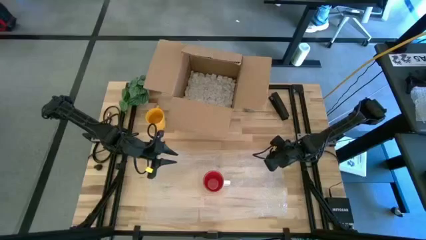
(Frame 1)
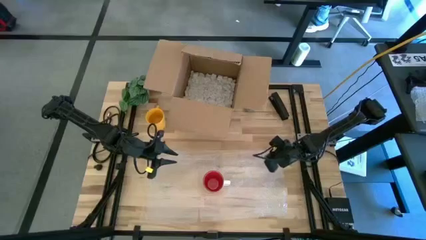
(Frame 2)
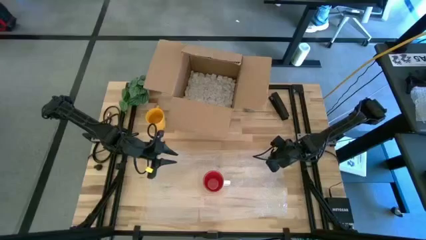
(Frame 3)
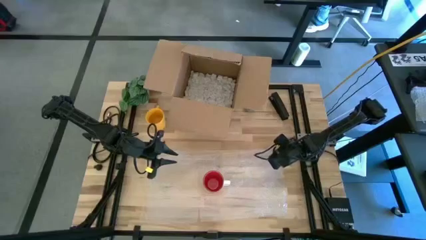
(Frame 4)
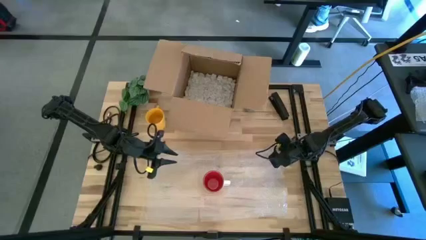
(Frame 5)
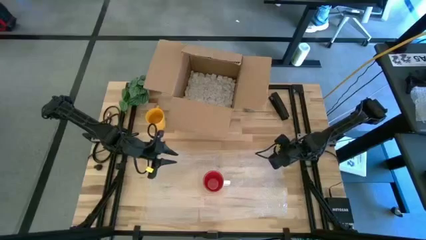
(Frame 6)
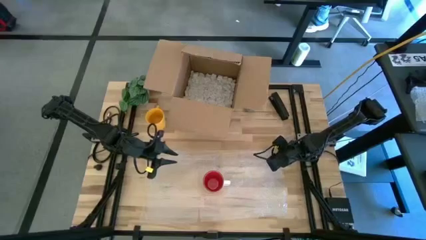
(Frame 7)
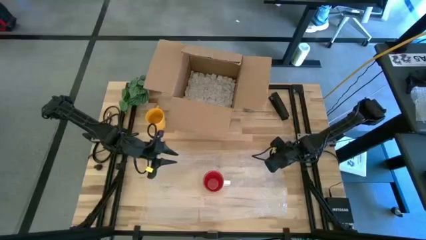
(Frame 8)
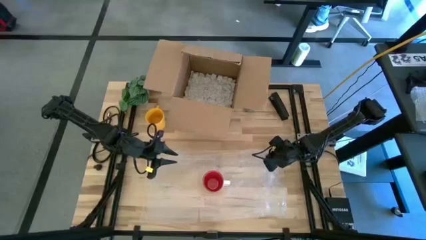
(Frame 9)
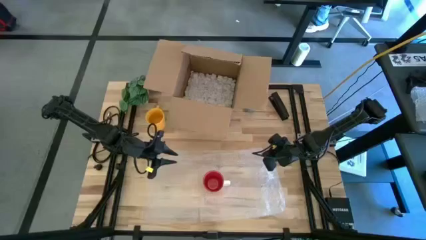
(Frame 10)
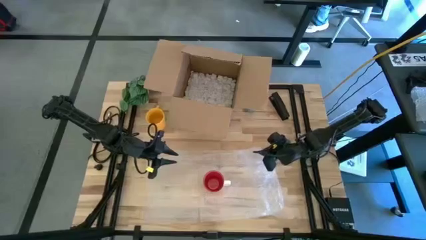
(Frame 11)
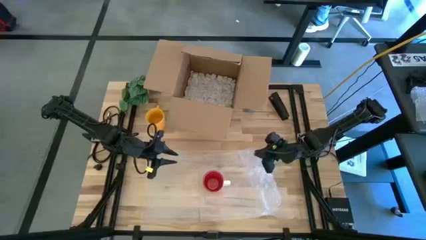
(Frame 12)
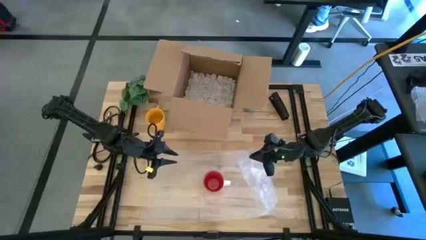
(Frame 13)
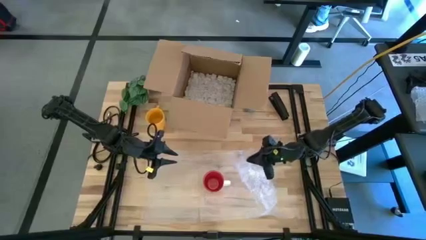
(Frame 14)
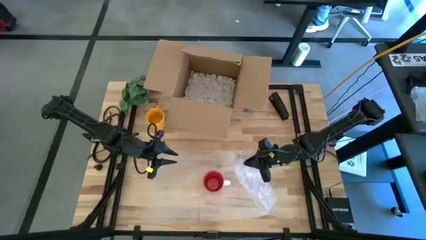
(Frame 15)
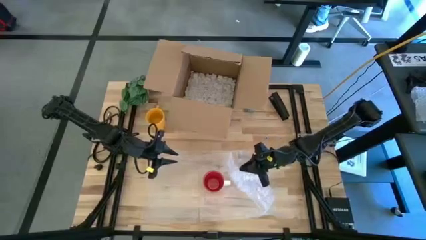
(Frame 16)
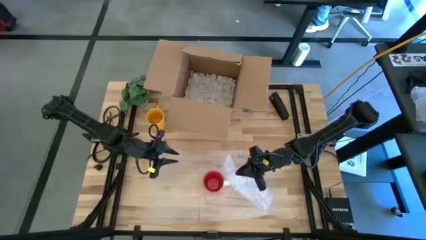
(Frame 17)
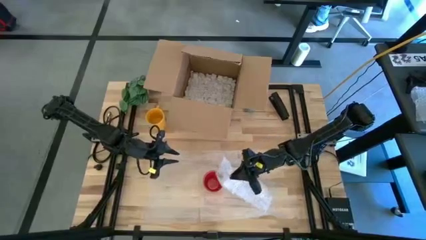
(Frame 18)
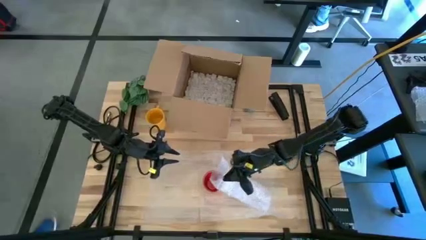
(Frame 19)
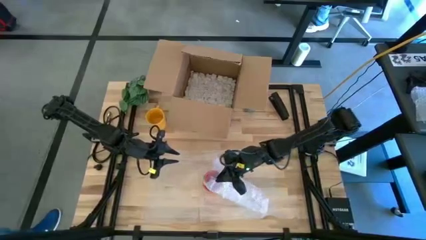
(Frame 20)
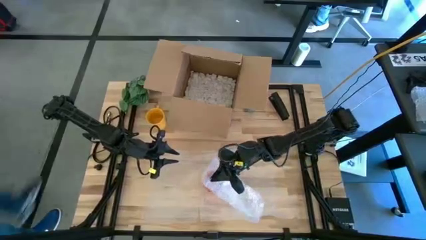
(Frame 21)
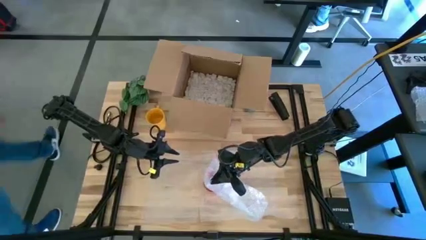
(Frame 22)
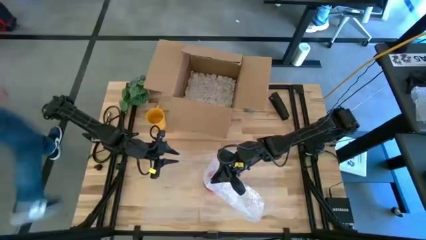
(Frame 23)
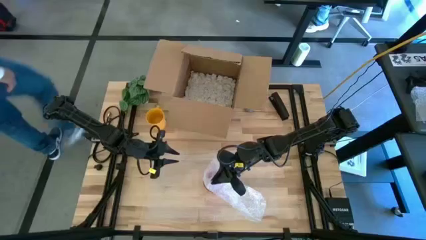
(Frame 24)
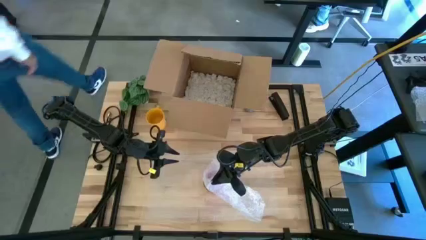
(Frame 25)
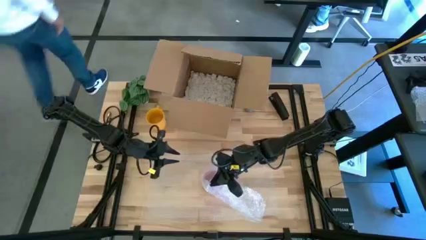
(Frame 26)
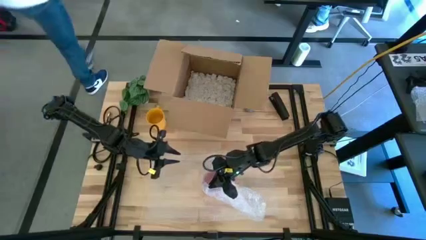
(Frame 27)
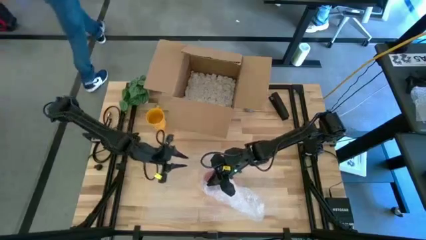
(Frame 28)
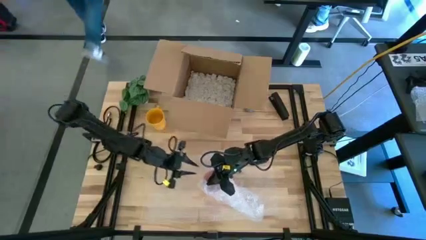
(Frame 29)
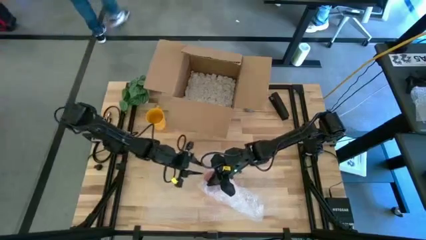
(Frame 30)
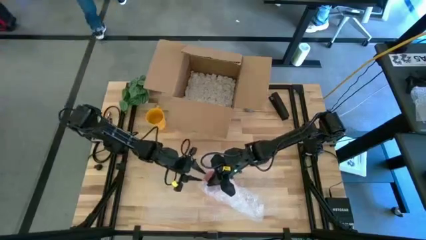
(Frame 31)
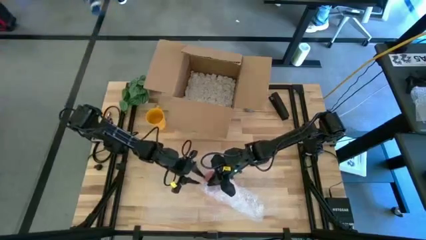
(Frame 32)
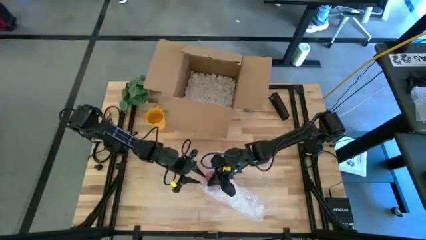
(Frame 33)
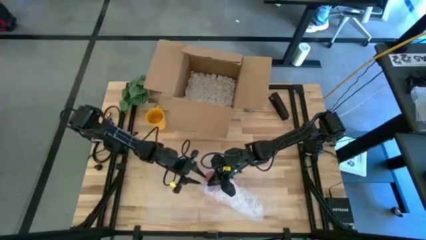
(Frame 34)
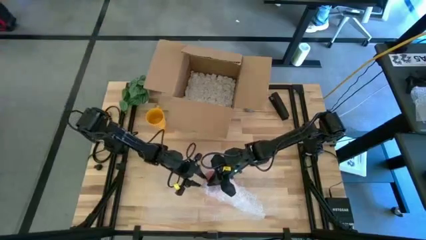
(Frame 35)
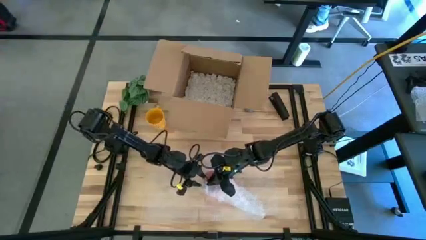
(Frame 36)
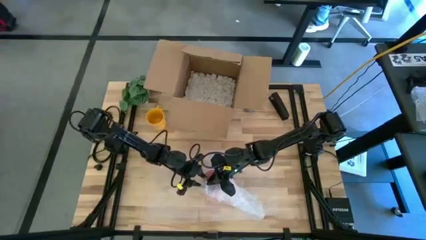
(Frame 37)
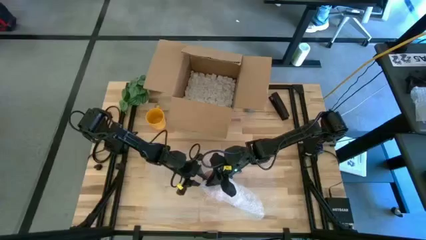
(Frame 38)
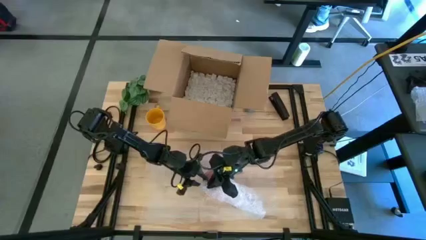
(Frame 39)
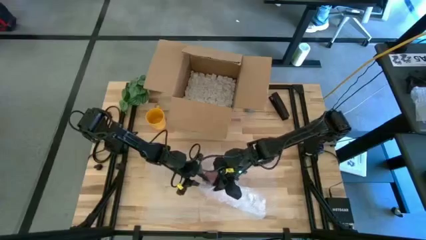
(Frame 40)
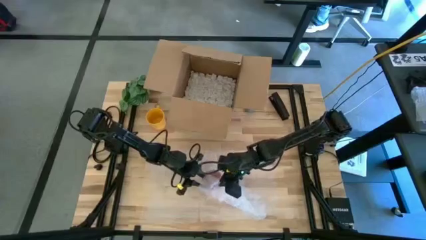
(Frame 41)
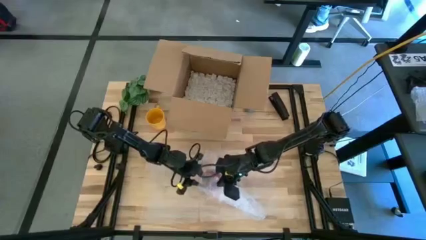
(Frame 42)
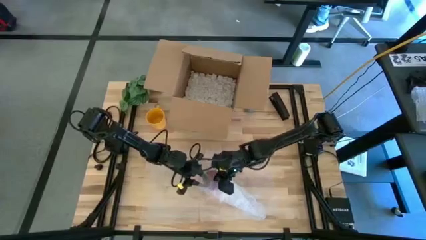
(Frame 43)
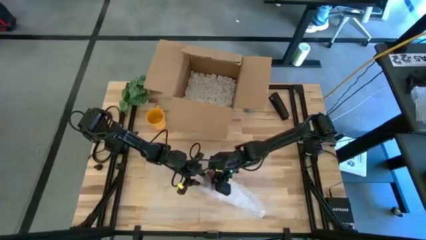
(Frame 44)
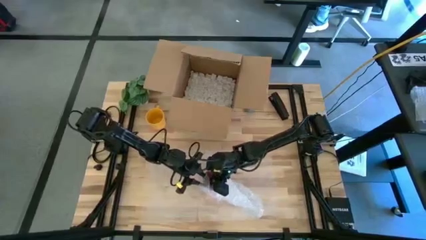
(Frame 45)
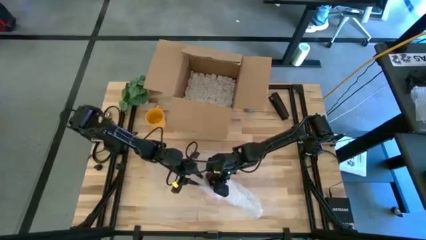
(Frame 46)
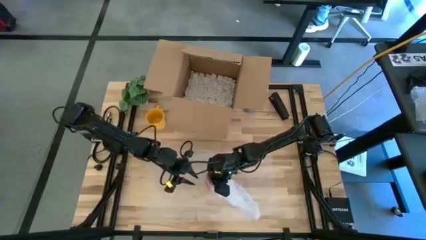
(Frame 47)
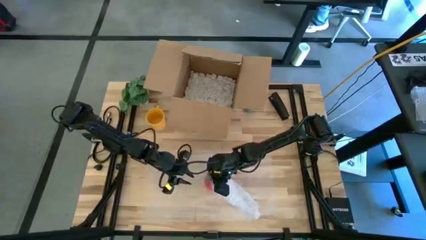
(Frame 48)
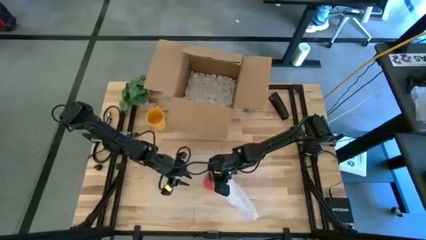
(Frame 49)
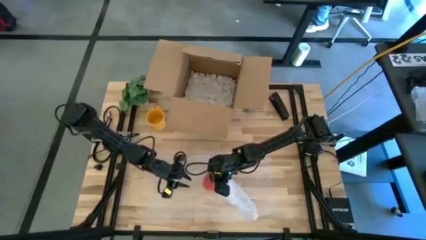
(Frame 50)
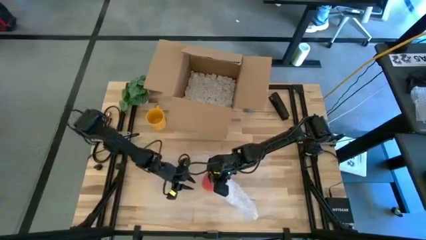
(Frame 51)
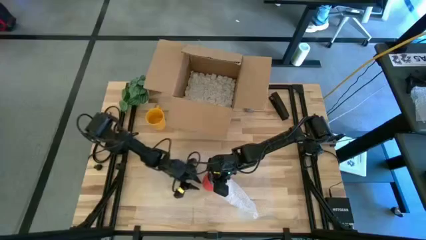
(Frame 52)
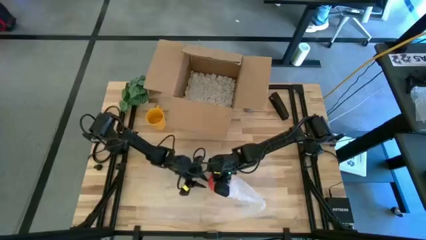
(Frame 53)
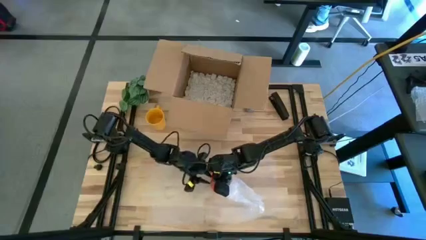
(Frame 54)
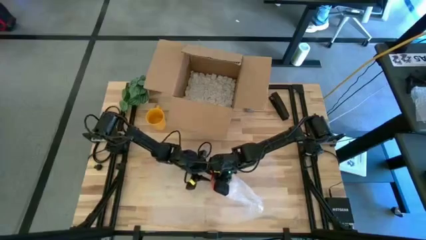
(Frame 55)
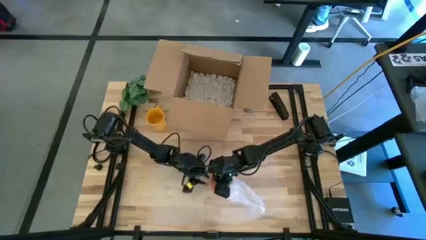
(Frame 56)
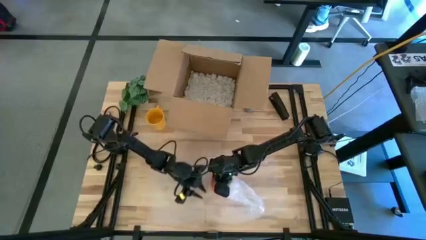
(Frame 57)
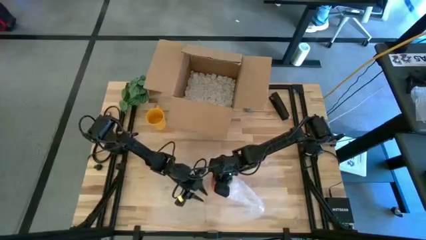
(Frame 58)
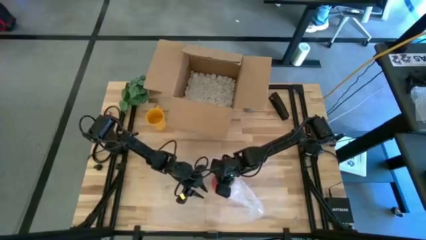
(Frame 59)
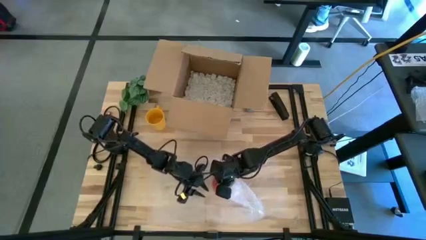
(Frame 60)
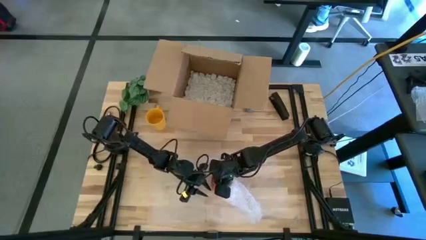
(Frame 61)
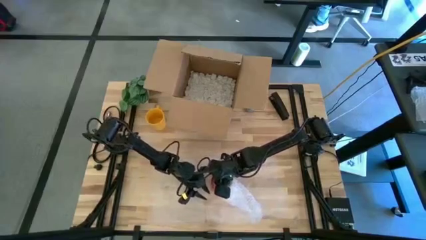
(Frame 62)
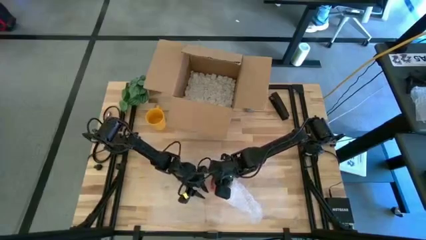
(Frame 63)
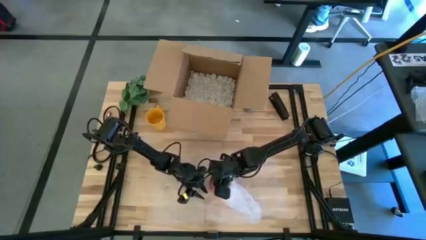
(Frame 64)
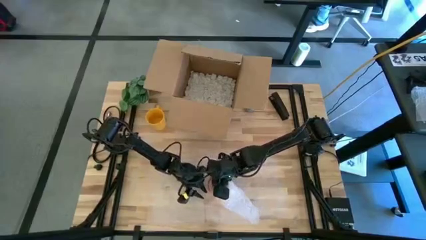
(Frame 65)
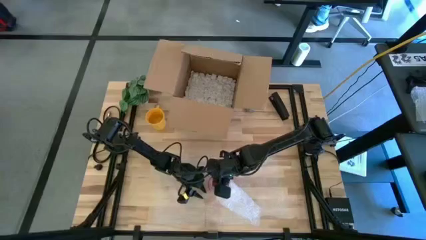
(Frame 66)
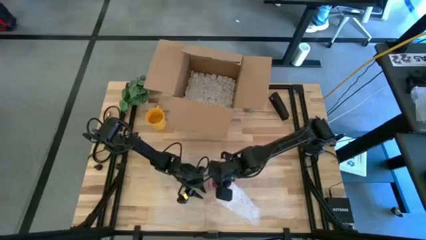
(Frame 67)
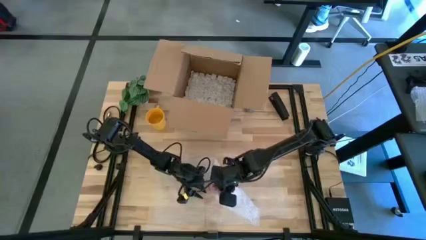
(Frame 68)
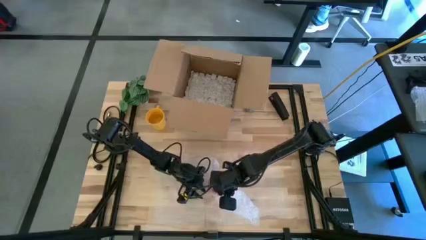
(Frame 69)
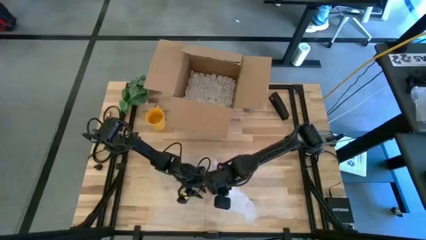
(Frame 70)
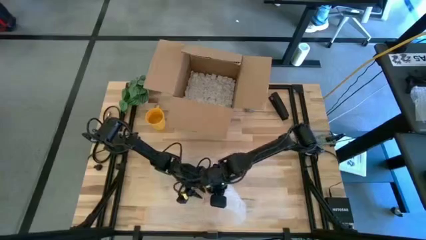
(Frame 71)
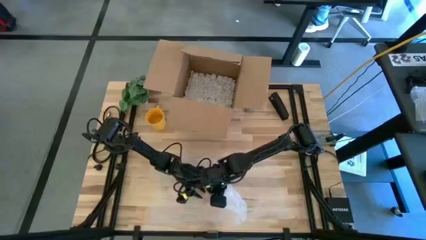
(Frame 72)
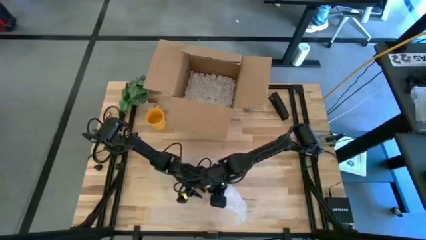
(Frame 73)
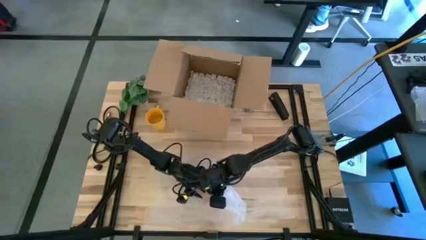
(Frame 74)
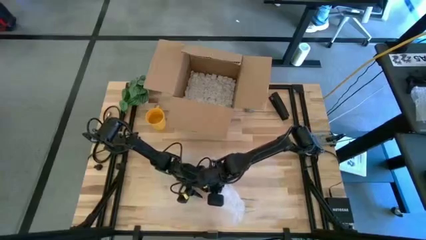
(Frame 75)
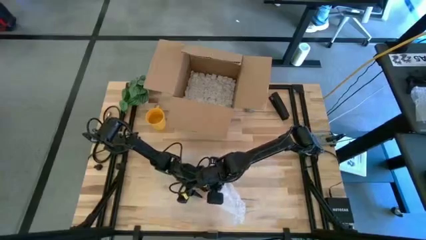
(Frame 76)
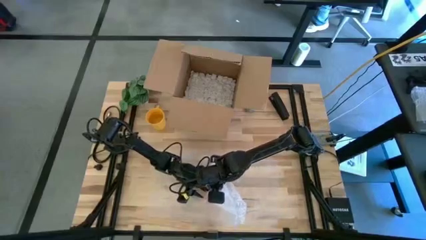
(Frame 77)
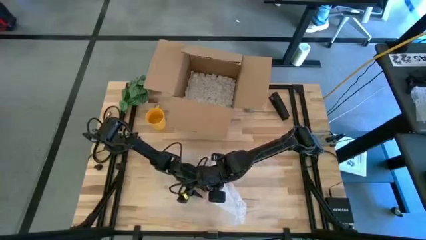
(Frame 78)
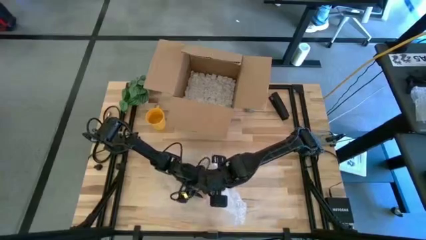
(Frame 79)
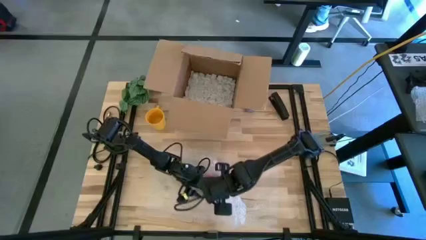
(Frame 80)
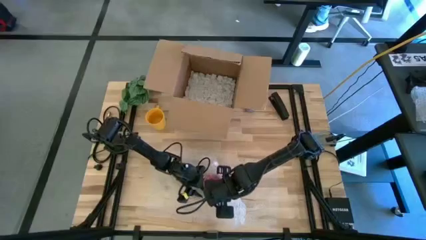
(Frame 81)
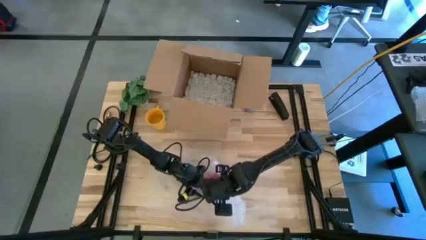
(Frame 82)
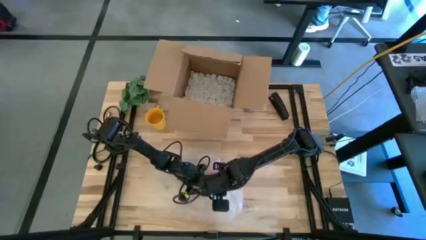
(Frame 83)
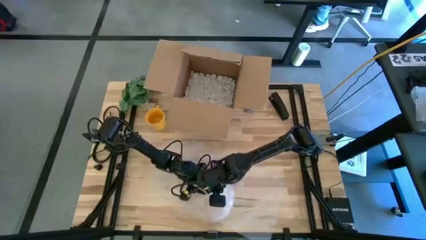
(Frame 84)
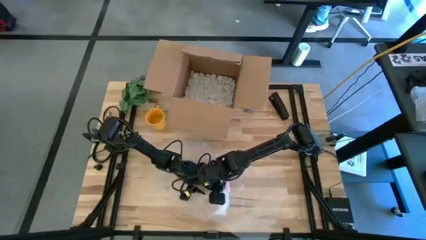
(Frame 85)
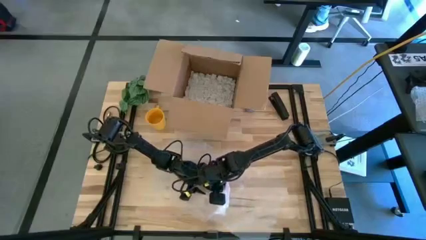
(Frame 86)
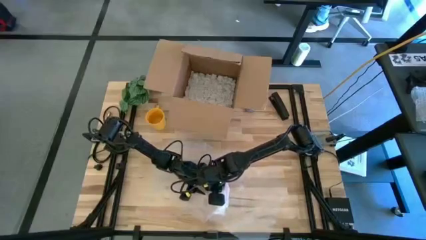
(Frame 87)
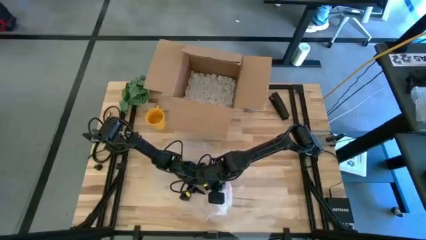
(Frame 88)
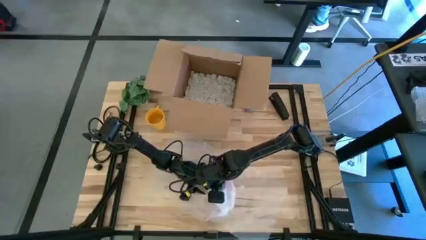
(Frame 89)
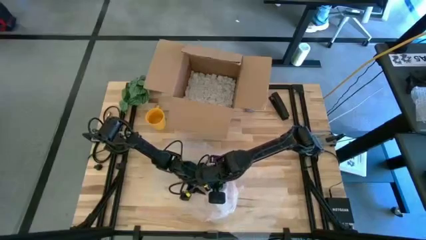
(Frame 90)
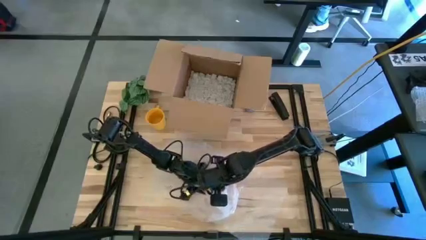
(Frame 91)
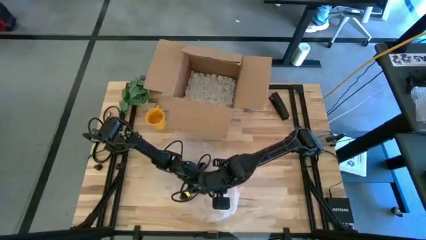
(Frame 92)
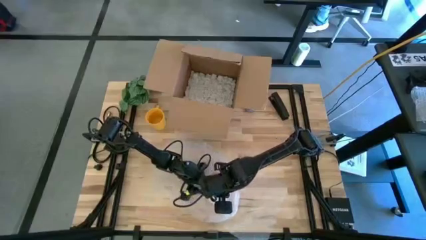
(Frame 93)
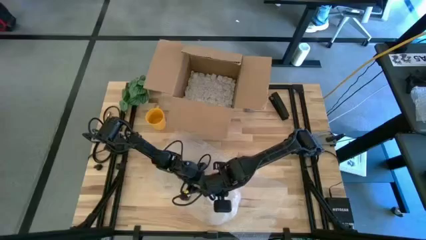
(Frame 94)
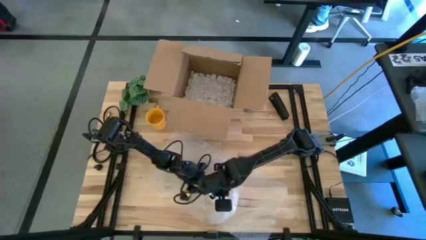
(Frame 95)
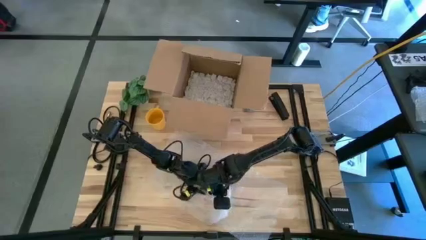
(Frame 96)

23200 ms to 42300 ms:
Task: wrap mug
Wrap the red mug with the bubble wrap
